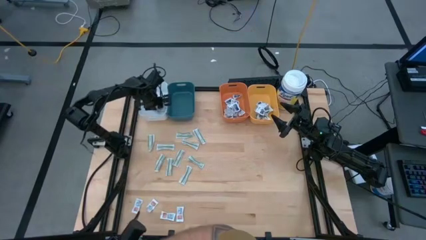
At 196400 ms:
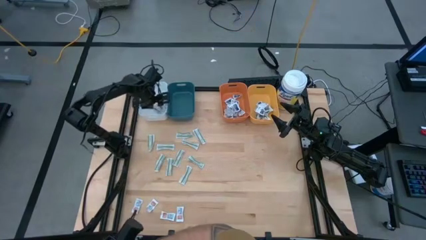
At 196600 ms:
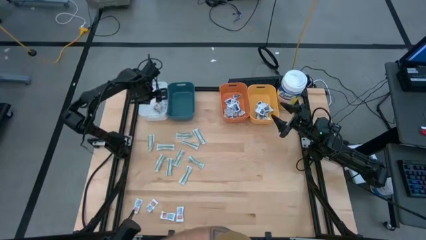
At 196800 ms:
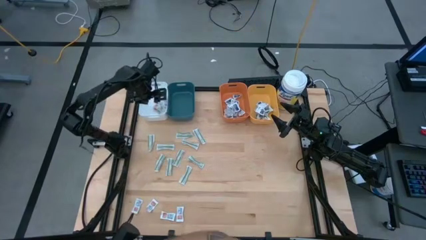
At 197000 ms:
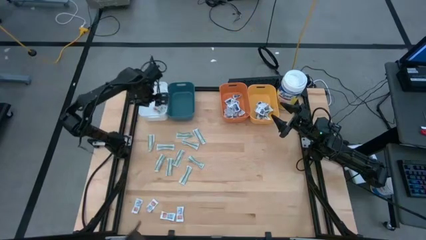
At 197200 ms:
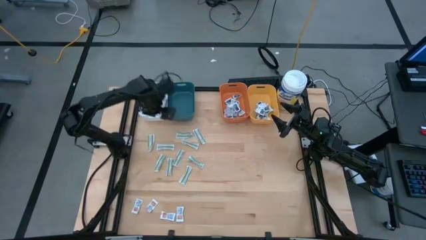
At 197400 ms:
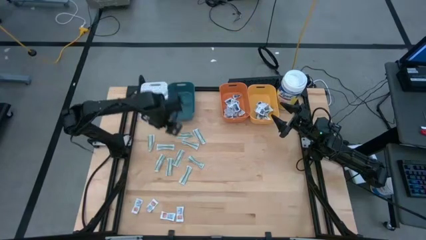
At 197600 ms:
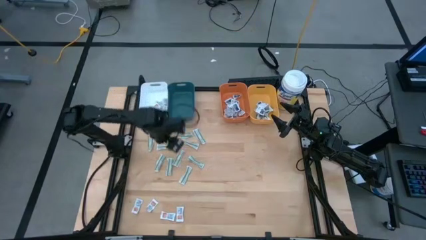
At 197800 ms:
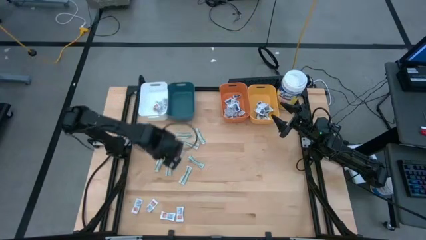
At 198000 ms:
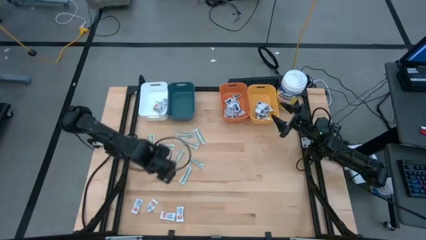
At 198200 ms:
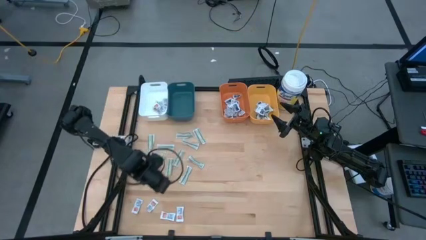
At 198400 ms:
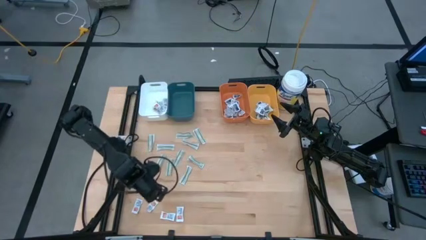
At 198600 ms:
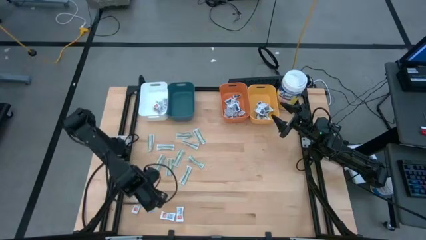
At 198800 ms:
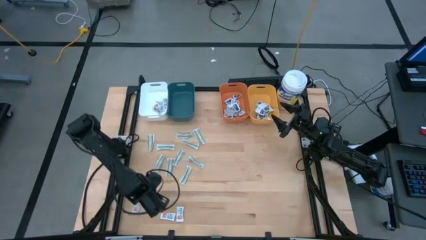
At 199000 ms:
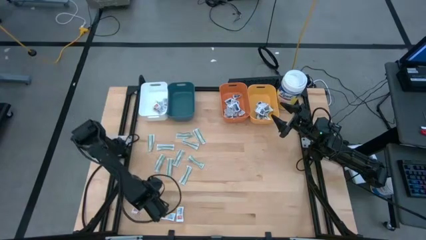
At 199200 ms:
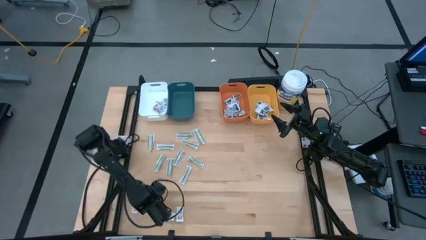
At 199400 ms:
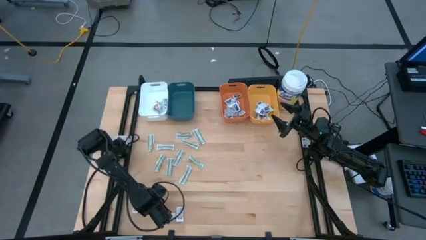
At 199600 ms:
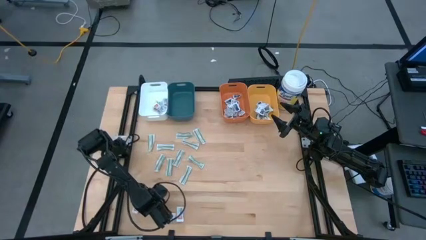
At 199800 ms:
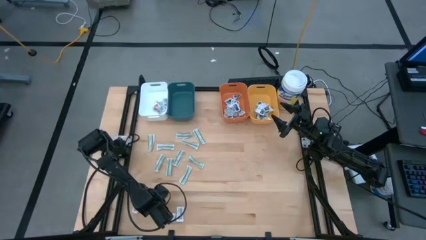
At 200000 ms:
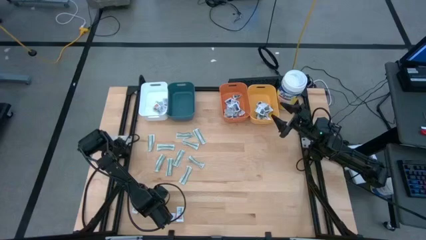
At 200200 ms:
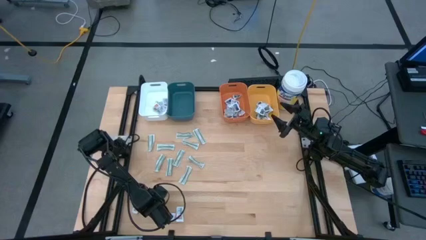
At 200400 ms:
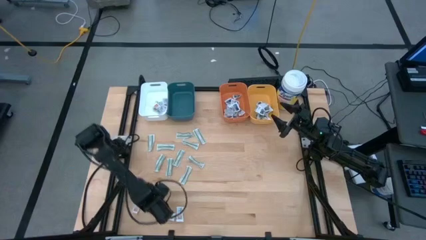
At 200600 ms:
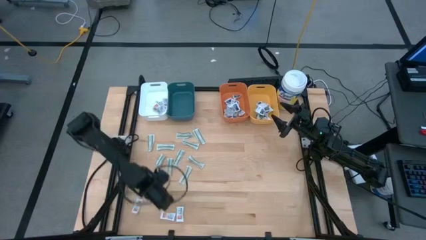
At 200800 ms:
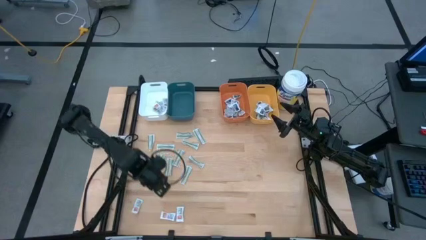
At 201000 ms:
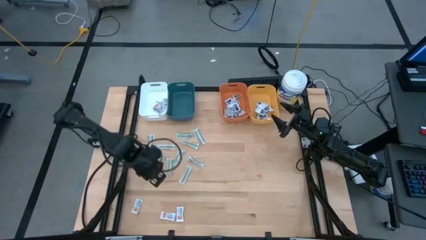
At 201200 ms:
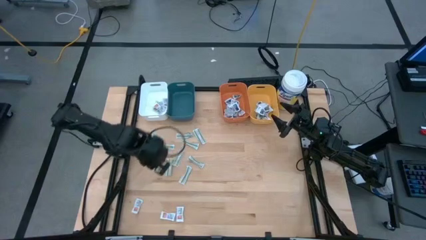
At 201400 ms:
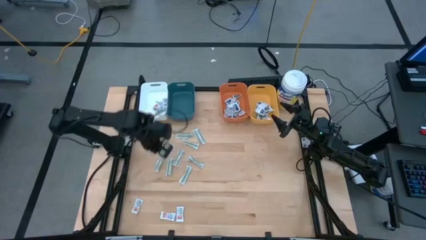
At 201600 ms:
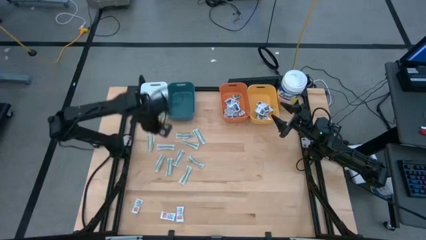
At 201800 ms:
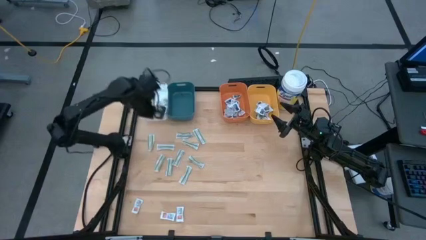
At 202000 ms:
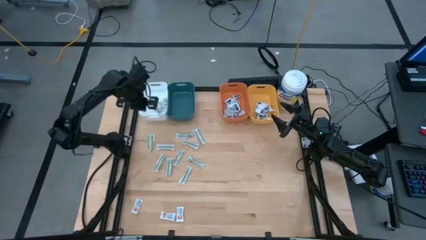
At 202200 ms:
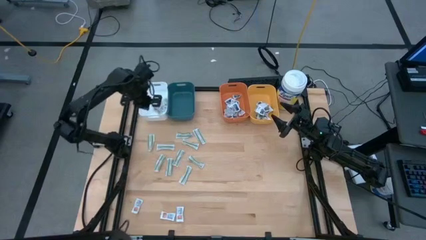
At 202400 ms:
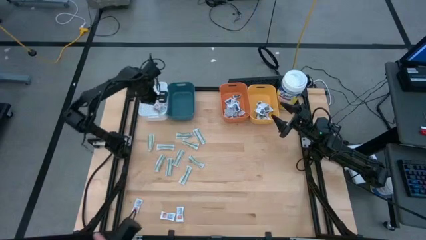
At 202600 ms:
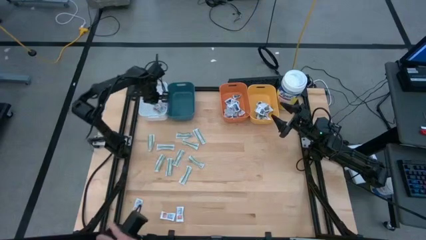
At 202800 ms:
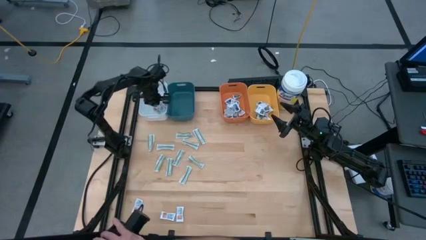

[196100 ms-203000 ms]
Task: Pick & Place First Aid Supplies
Put the ointment pack into the white bin

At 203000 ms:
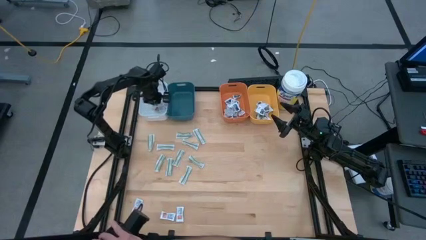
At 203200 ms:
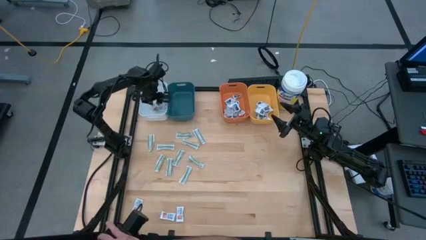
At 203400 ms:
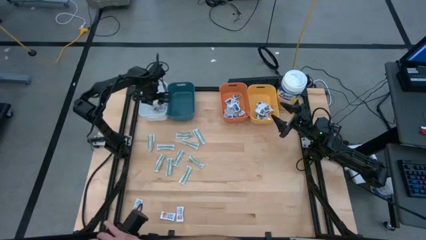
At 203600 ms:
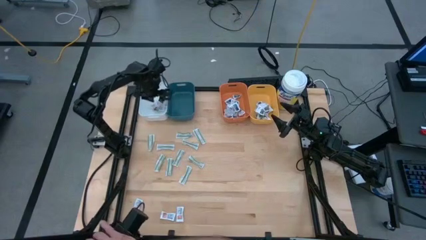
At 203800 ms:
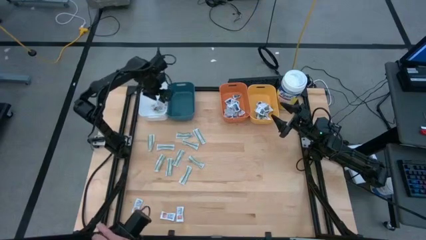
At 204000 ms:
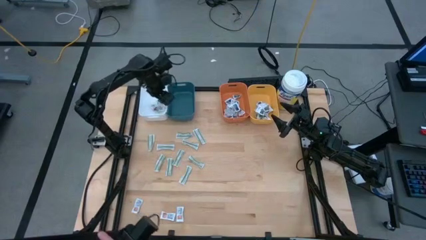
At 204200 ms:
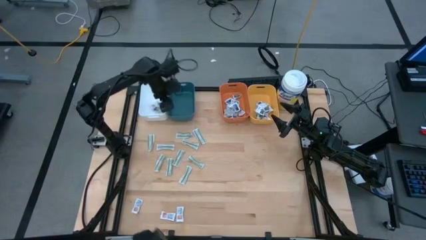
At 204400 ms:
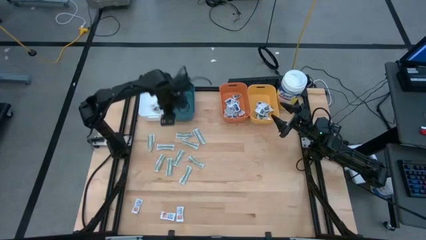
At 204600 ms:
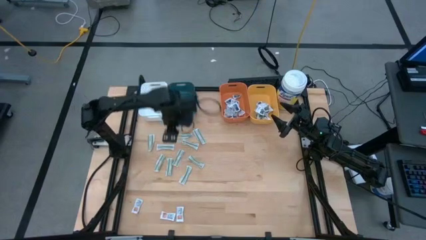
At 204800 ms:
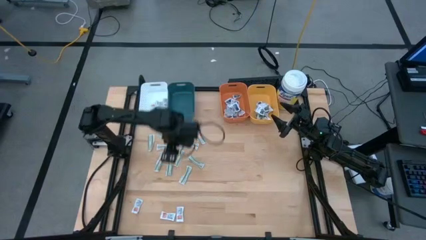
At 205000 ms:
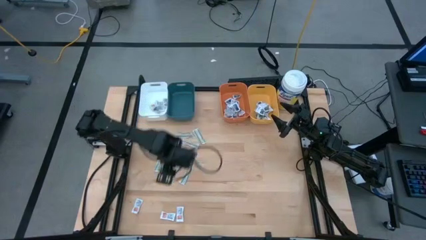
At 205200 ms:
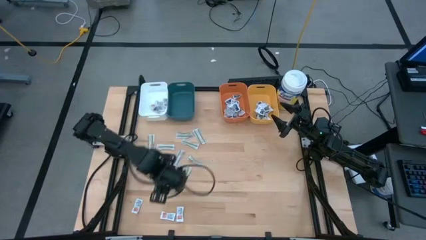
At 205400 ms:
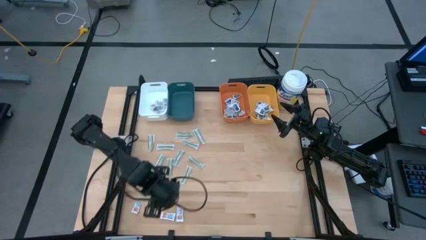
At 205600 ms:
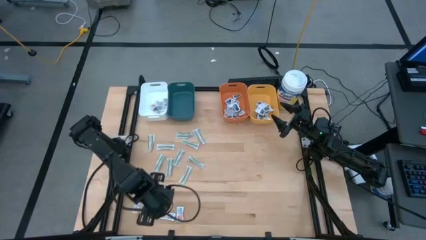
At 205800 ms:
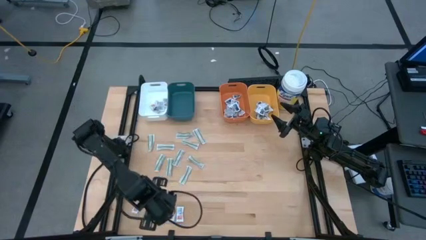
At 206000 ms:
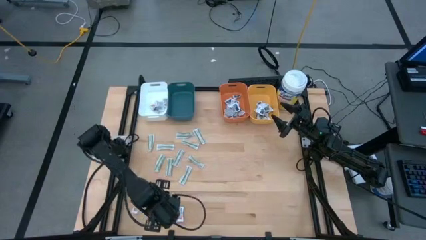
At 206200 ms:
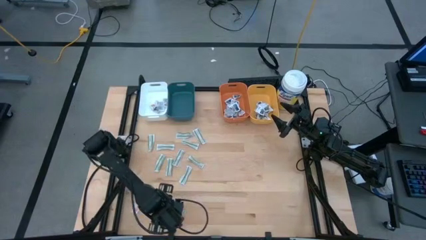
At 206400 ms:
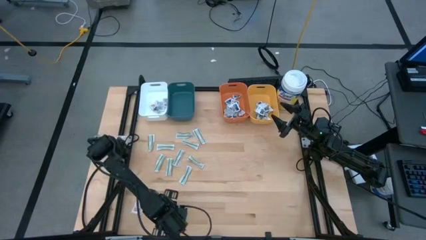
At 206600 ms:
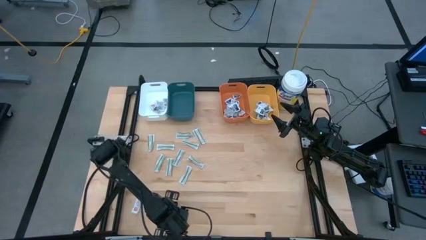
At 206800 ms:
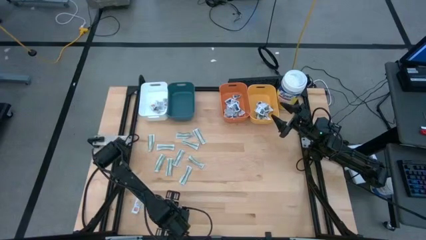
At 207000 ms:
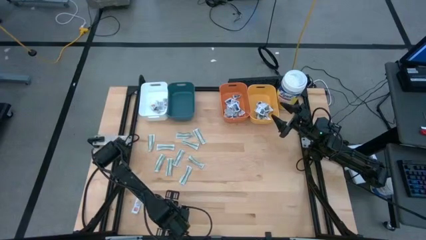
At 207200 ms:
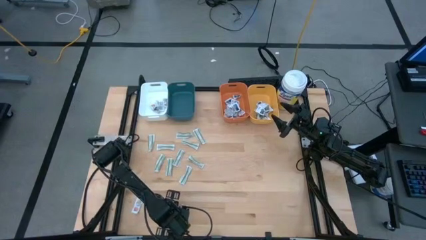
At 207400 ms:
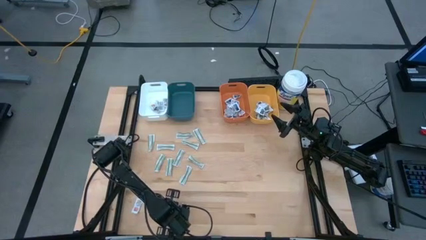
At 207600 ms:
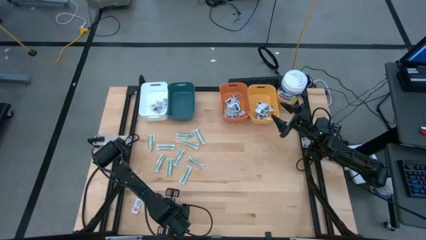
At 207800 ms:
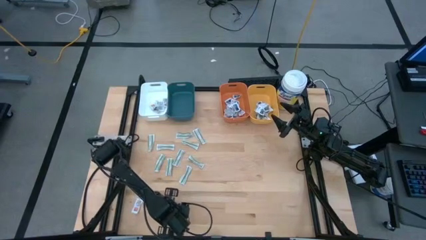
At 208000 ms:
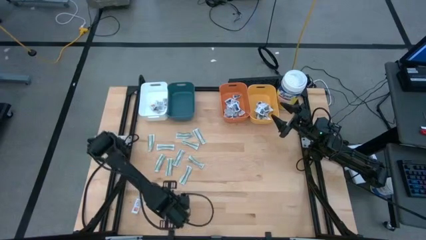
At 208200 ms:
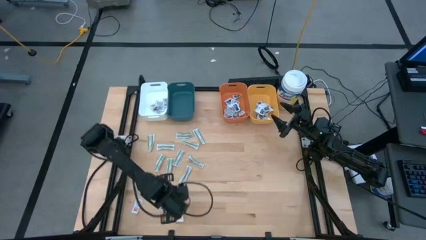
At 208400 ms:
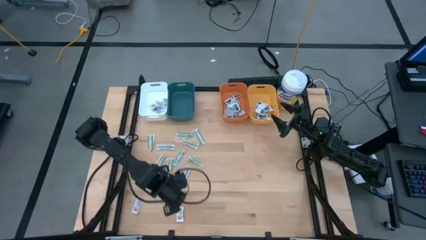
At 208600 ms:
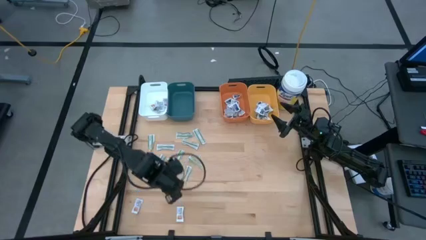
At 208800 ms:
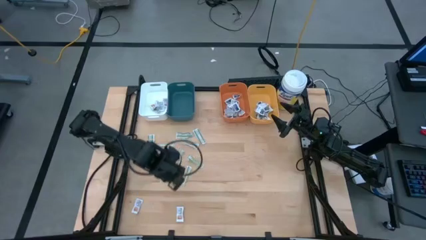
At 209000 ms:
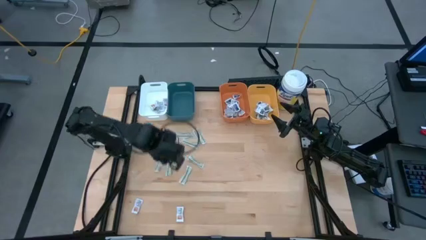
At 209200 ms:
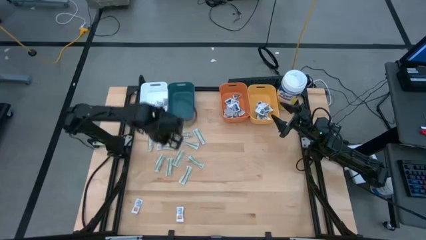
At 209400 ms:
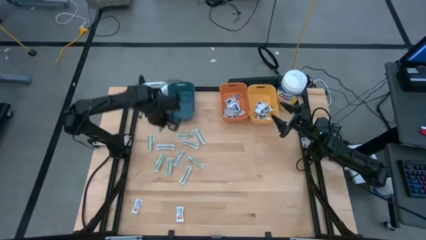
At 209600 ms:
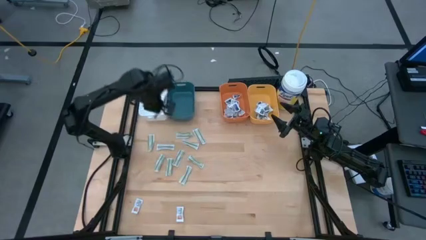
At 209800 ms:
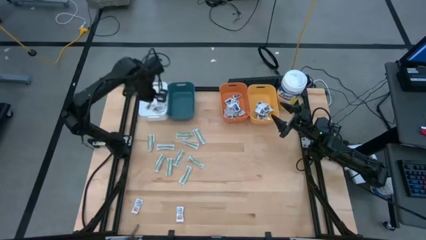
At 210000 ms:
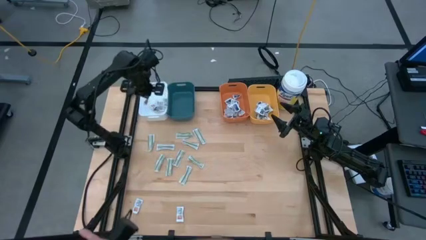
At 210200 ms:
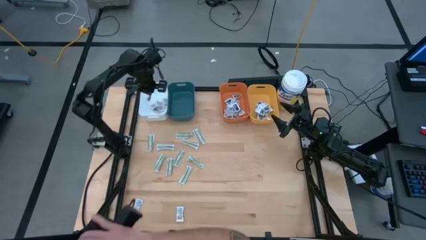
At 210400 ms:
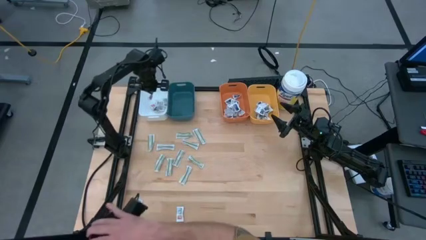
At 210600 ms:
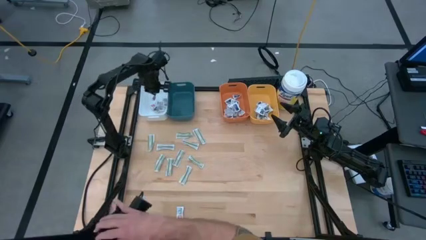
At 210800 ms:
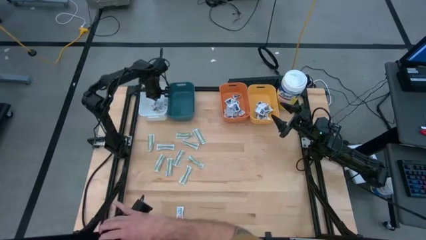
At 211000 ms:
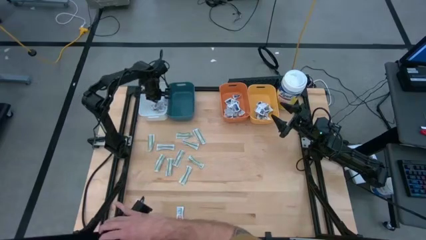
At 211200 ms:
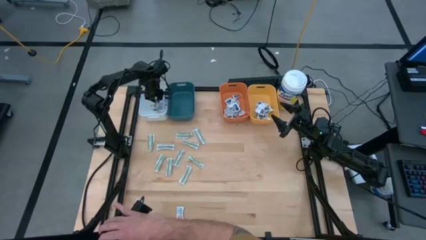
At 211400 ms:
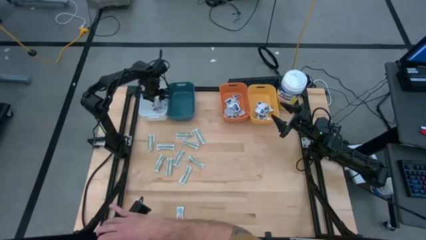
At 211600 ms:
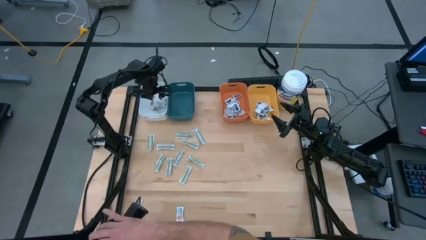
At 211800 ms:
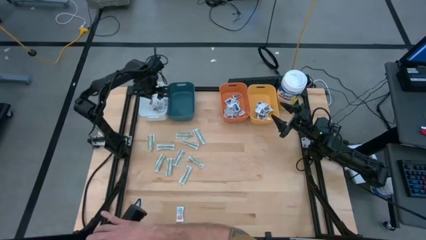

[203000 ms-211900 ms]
Put the ointment pack into the white bin
